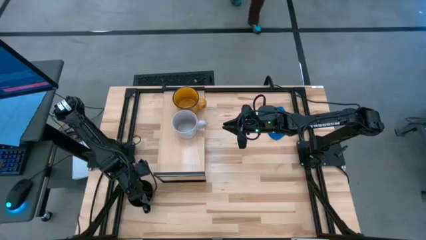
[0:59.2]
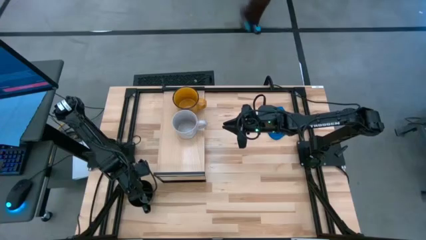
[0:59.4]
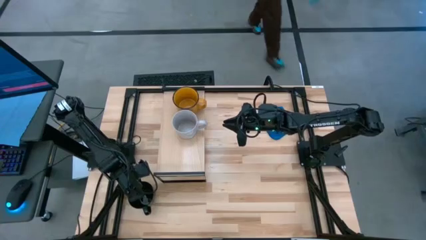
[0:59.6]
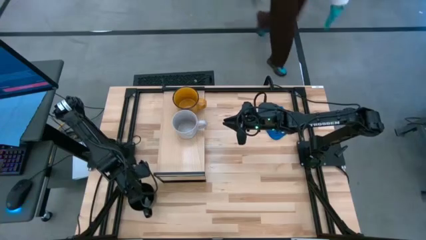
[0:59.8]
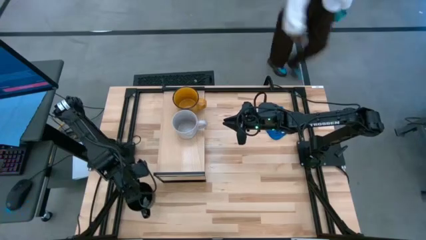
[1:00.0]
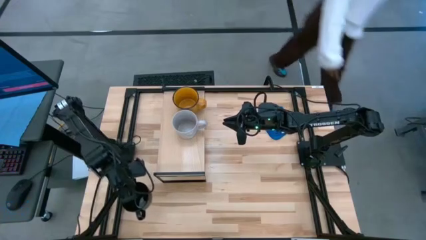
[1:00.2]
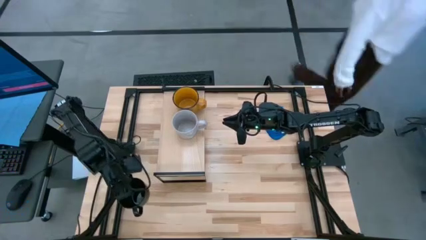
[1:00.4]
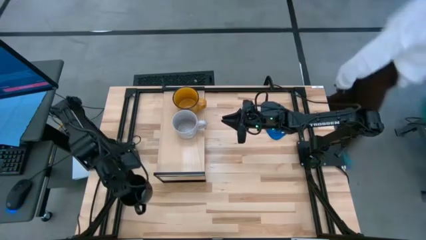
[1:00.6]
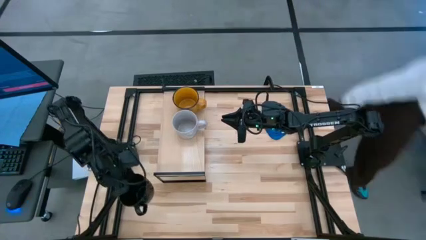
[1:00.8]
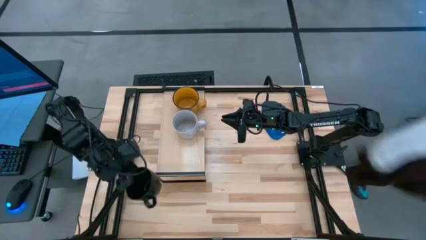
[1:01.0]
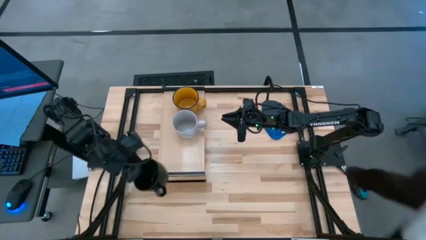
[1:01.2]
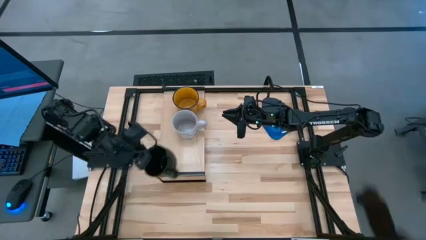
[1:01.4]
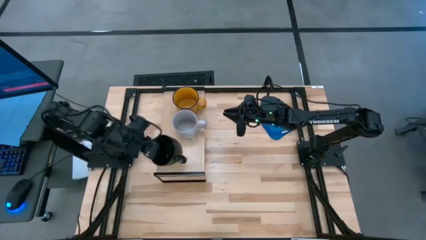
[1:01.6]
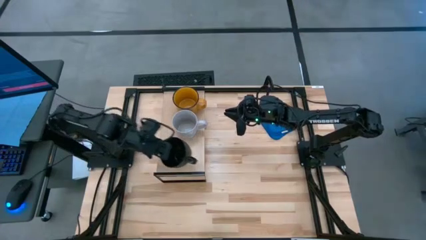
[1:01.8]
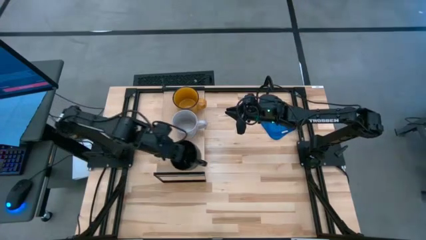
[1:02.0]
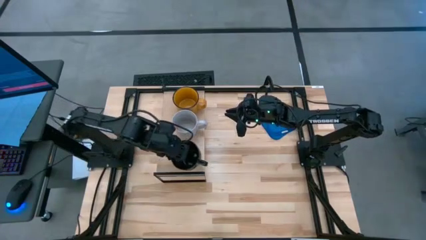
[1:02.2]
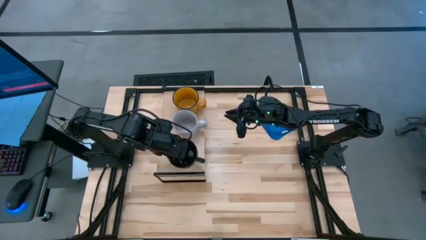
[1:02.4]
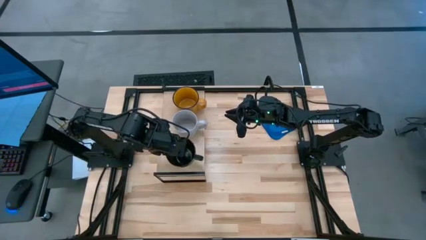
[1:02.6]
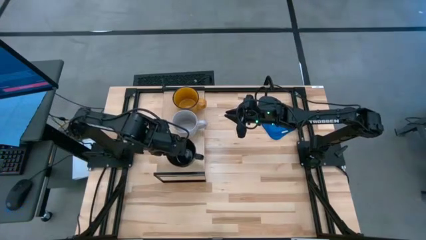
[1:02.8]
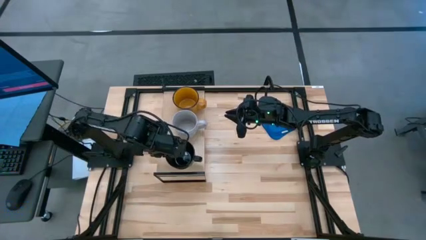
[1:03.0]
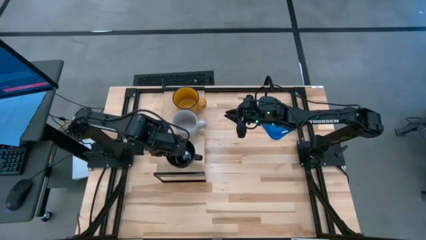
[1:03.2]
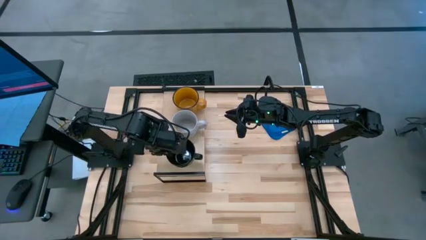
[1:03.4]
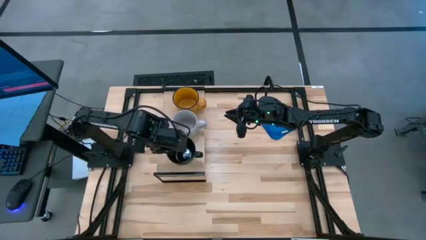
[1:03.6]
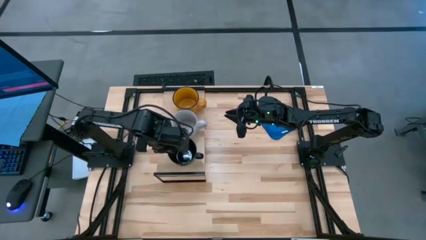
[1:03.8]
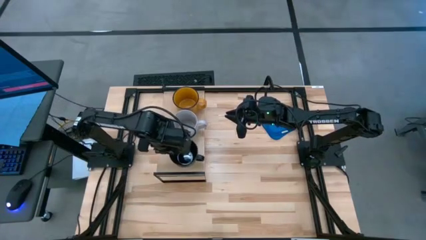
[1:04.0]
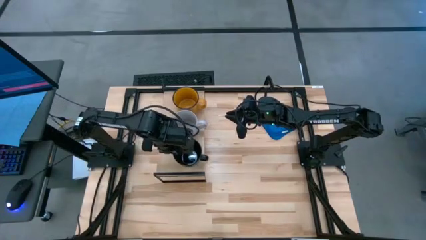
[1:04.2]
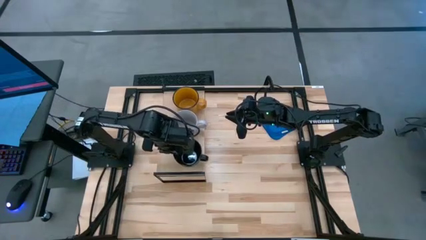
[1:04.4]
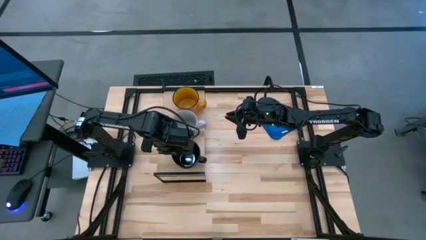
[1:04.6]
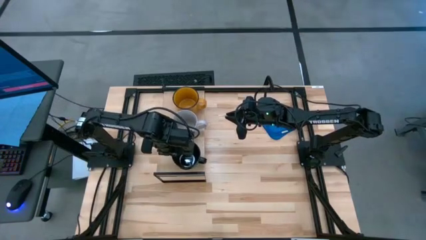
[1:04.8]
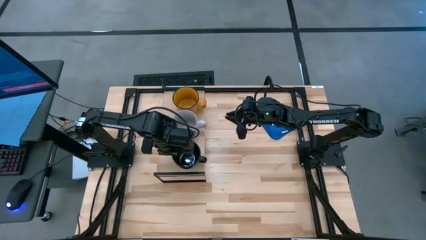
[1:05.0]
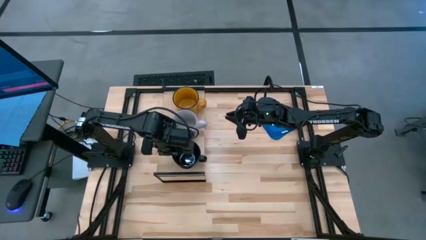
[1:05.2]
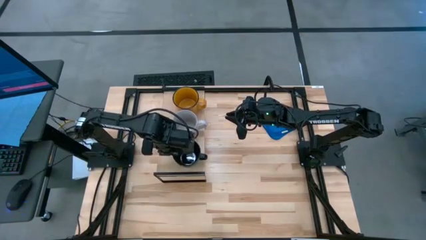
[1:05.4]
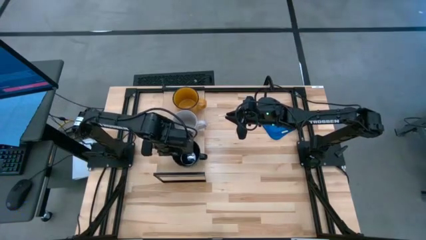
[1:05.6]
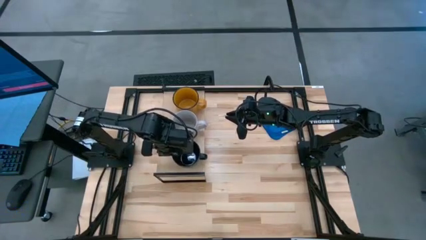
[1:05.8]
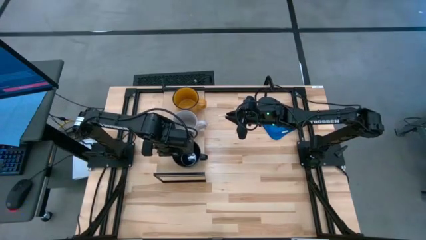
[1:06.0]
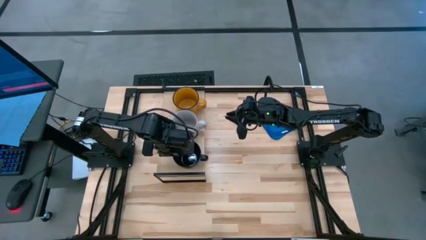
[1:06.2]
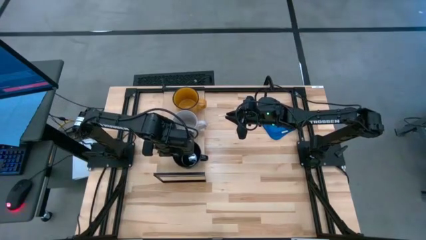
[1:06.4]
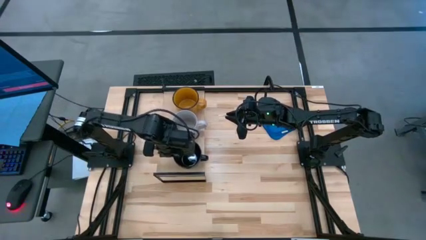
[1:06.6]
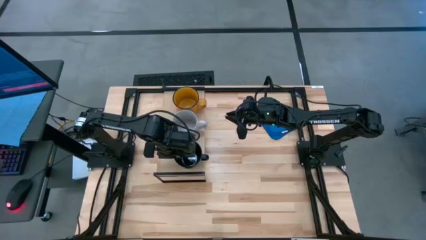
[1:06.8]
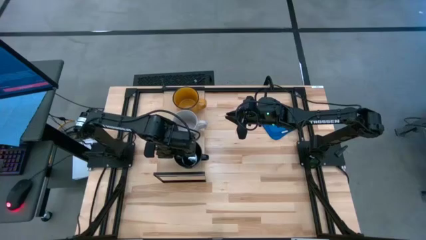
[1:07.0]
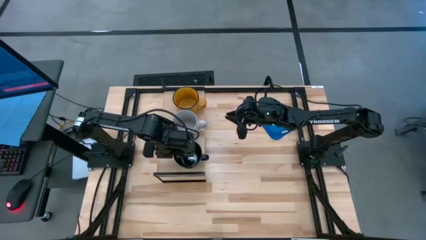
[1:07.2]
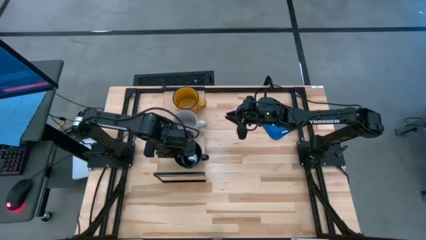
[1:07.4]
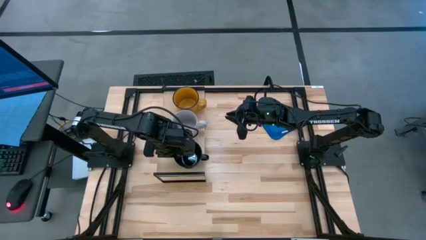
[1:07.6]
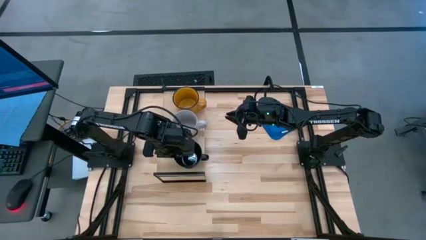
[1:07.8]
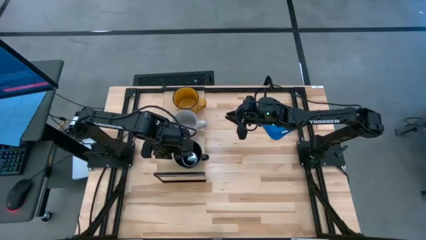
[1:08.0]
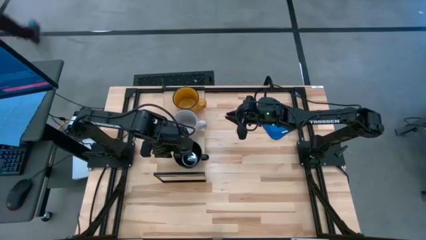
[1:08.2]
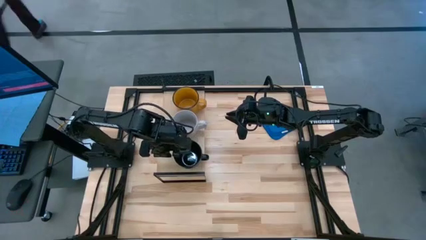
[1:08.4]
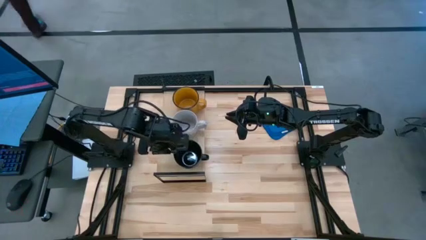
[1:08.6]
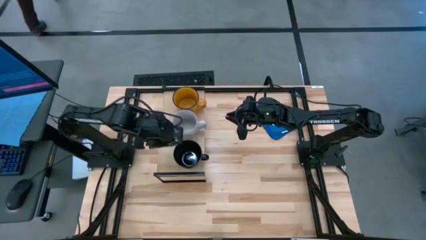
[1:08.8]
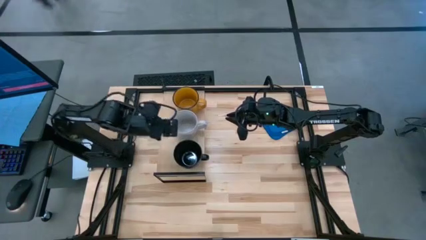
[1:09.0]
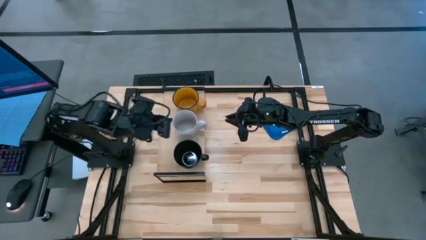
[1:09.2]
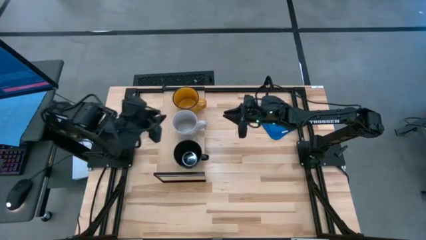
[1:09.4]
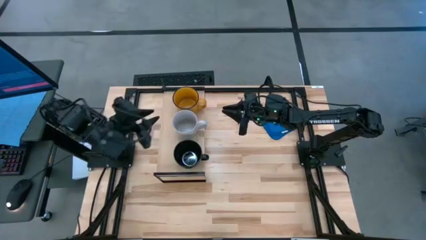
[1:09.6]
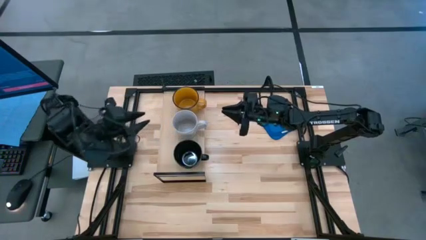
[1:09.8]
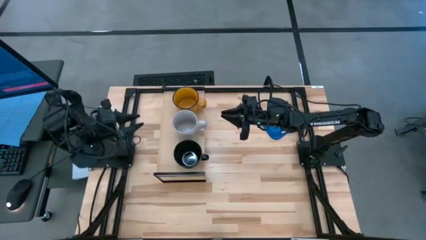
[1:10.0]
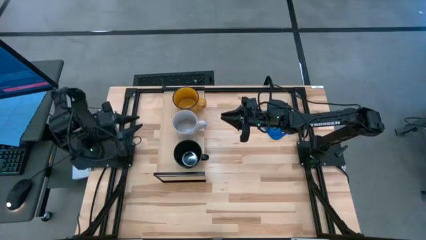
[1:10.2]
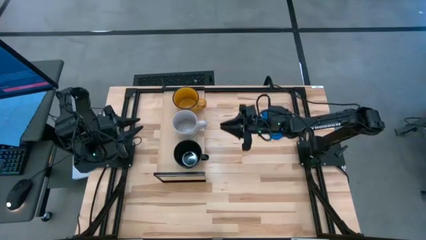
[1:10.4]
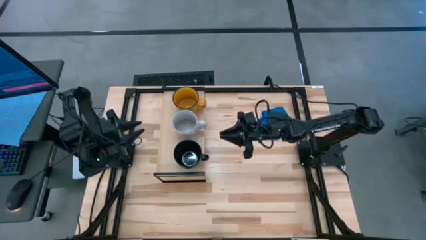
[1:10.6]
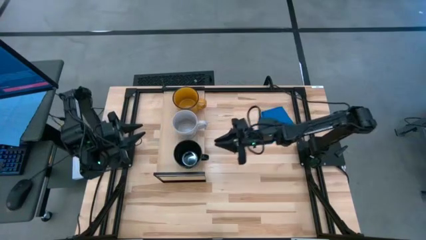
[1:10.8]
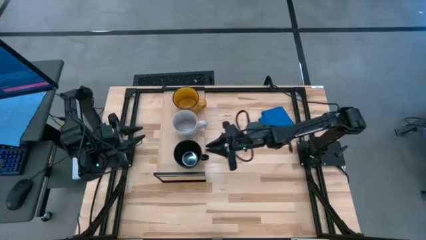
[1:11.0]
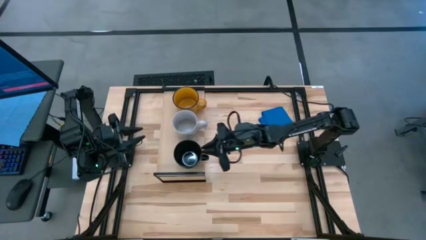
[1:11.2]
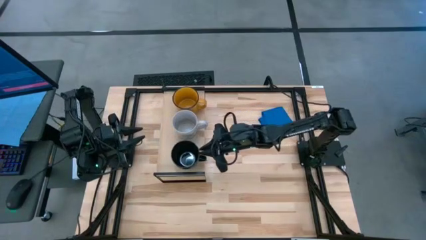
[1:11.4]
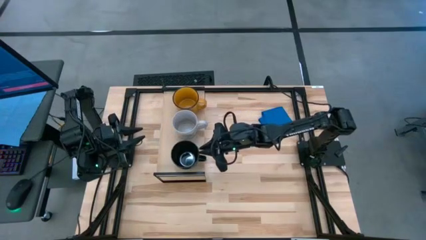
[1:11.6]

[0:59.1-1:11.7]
Task: Stack small to large cups/mugs on shelf
Put the black mug on the shelf

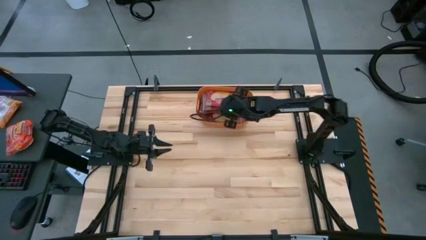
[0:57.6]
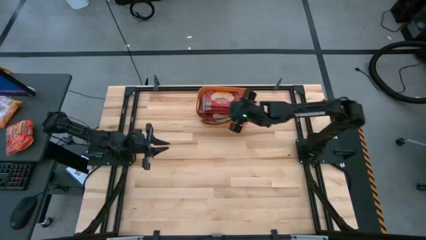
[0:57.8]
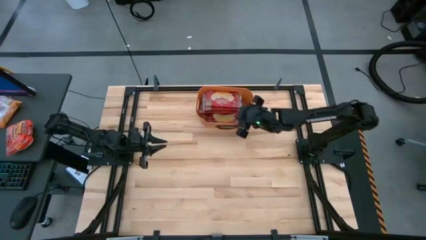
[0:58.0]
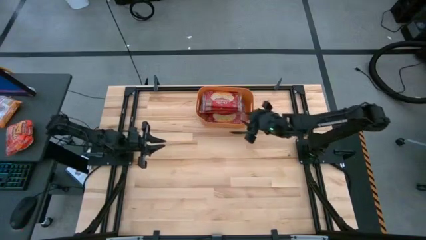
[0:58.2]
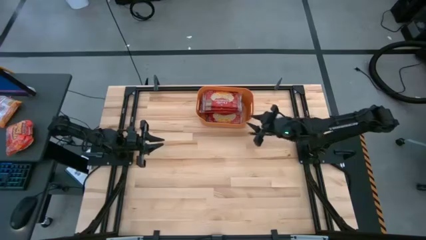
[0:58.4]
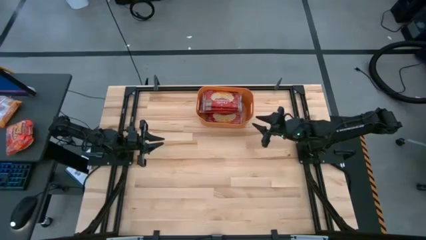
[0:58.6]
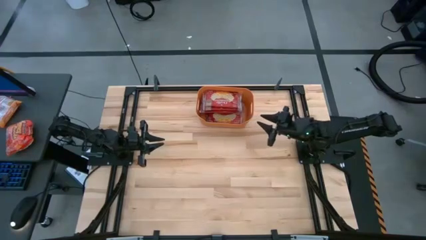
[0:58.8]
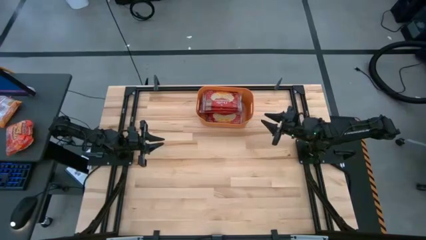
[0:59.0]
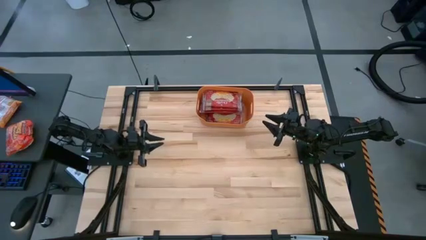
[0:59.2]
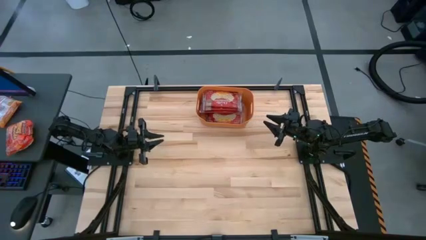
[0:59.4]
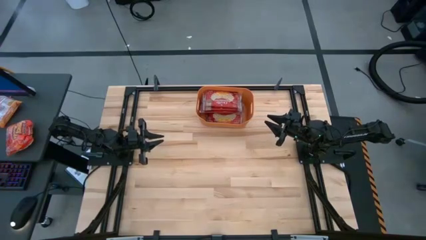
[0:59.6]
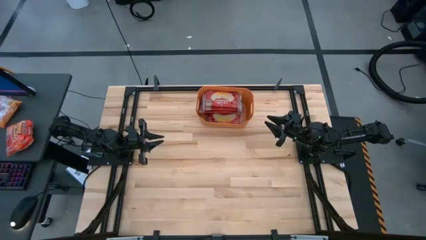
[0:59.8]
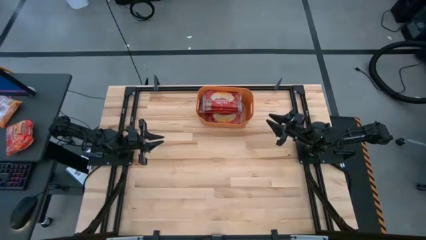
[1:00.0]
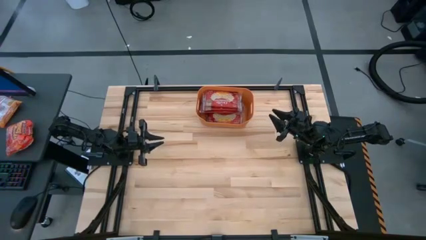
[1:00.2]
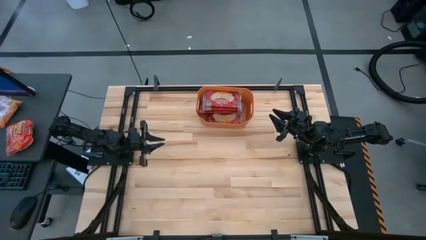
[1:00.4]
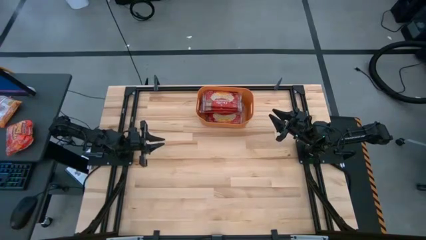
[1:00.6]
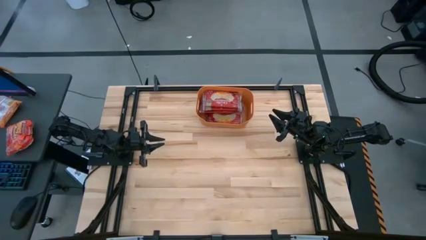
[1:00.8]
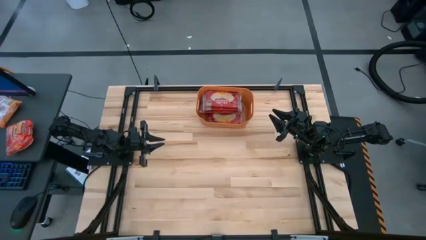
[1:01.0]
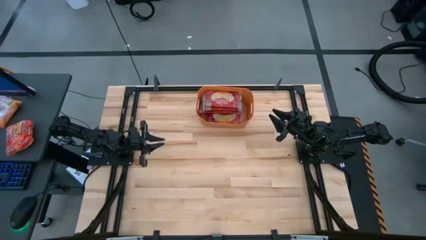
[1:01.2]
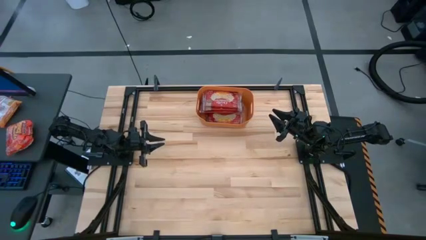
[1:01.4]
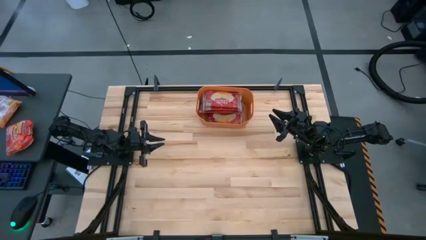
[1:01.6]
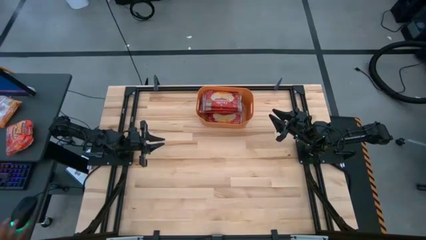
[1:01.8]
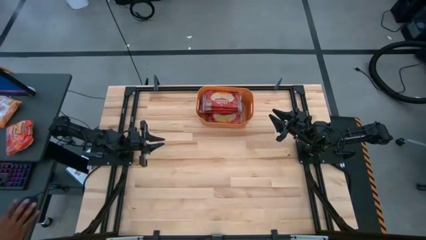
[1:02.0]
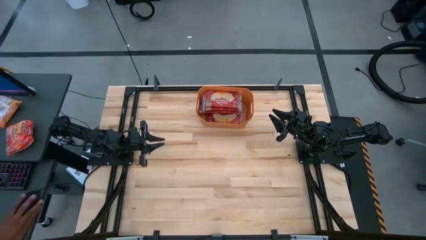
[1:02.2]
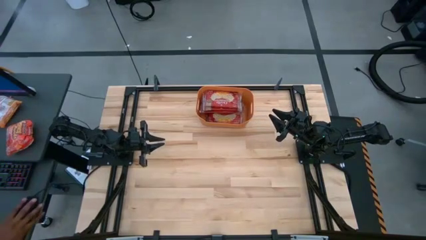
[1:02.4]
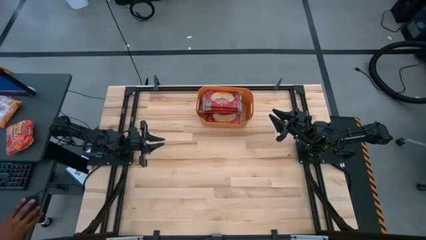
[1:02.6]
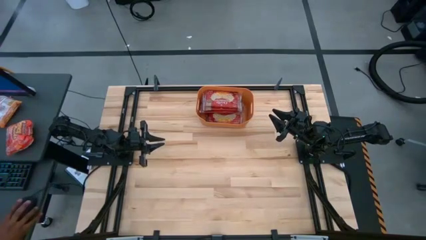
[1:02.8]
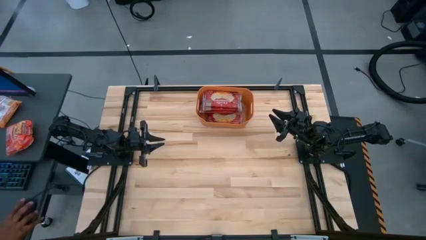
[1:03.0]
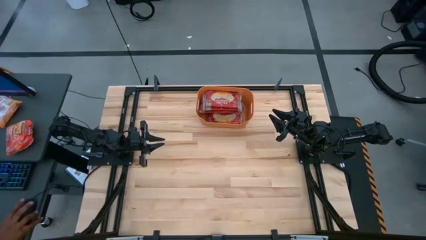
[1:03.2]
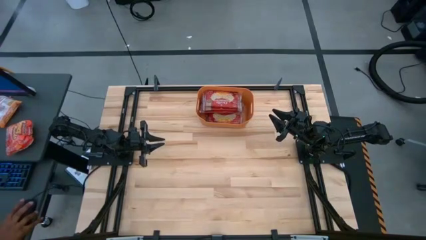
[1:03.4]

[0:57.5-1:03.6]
Task: Sort popcorn bags into baskets
Return to Home Position
